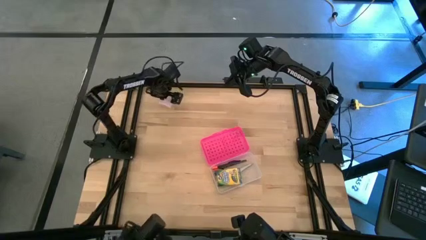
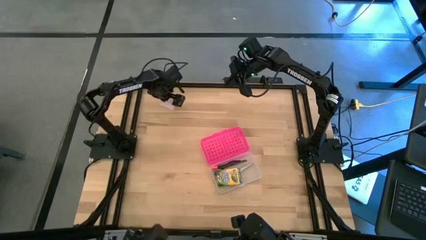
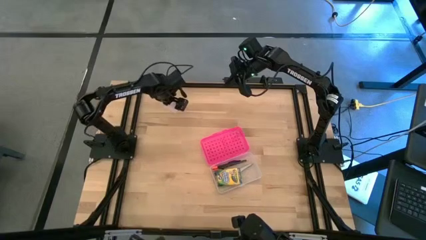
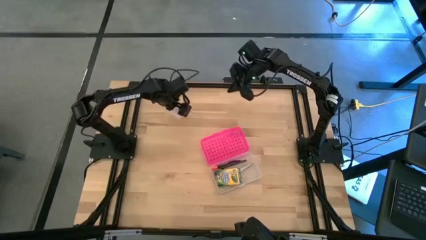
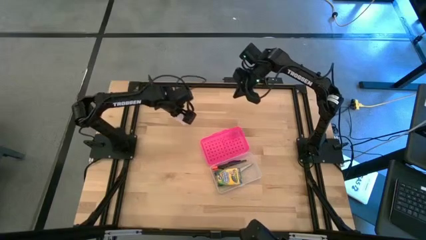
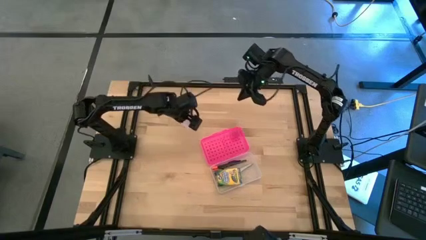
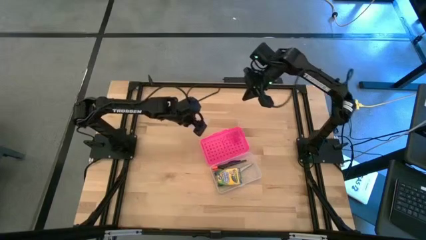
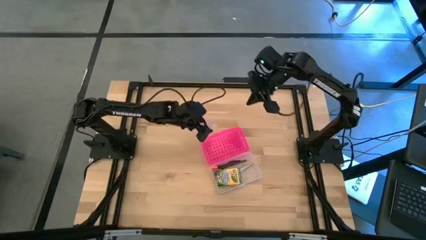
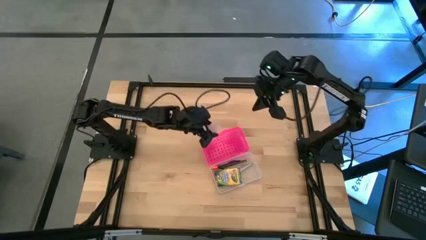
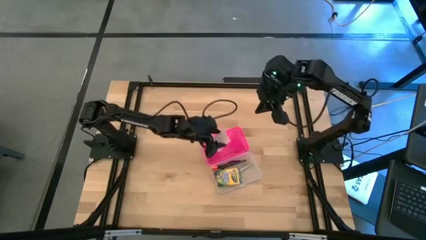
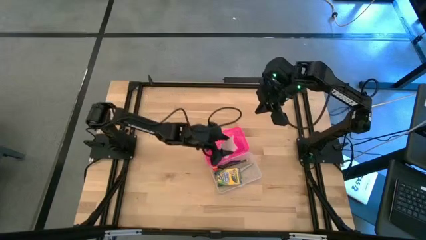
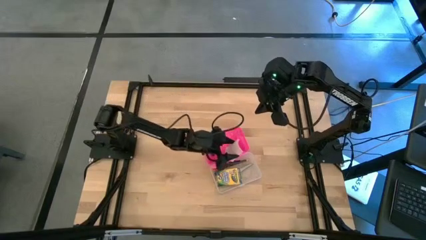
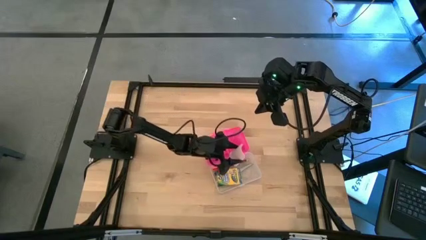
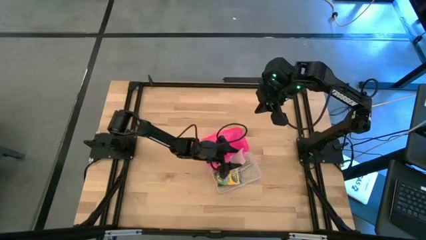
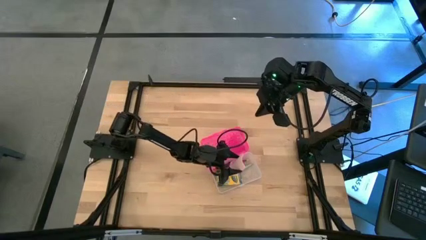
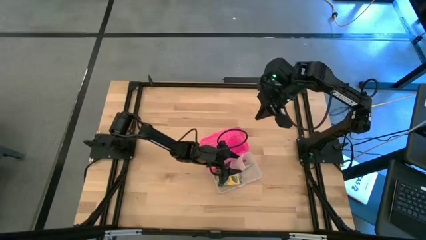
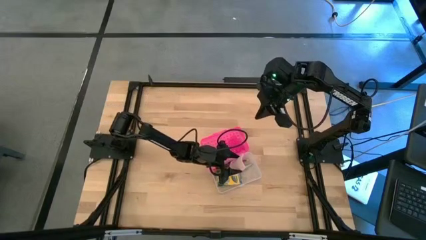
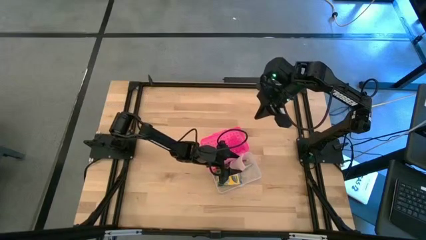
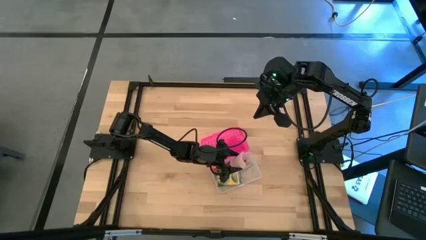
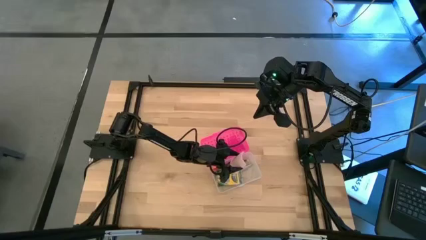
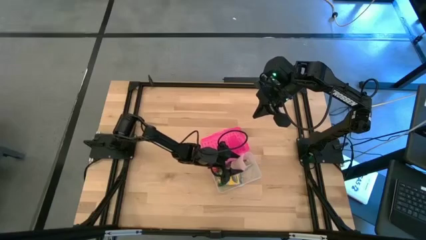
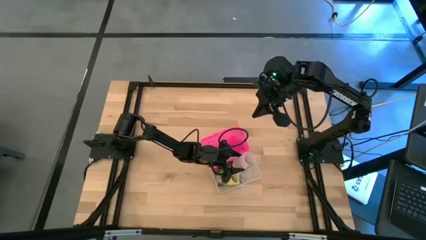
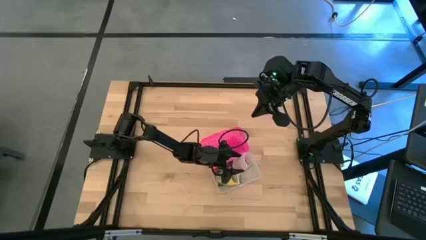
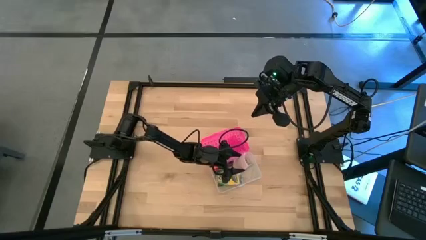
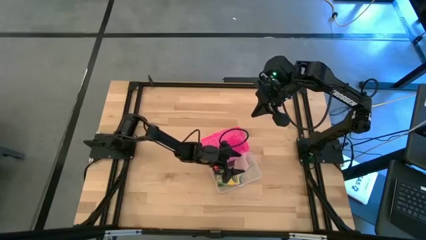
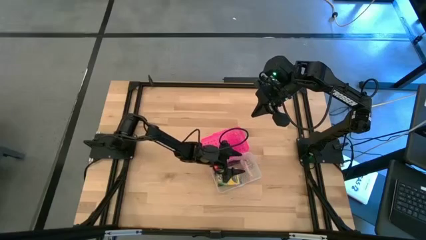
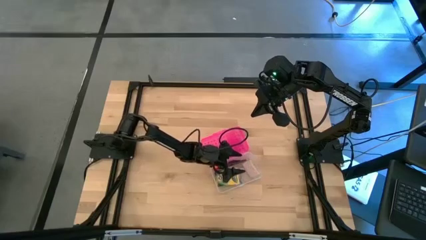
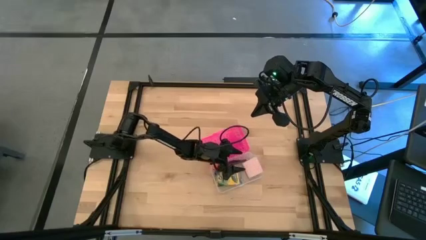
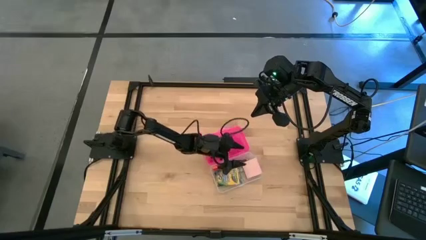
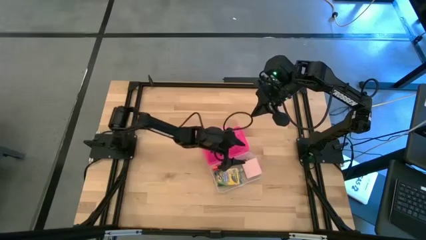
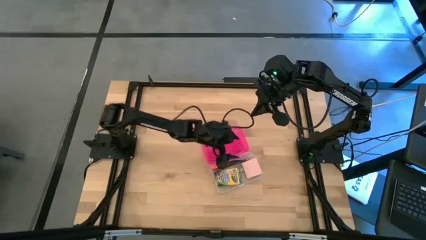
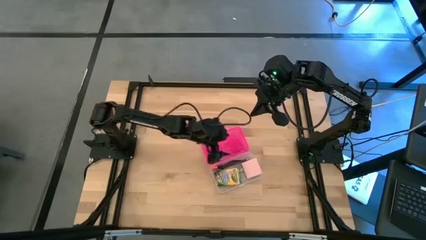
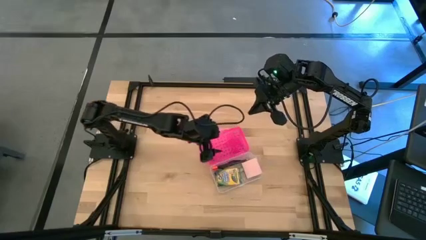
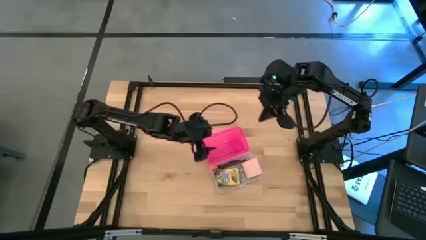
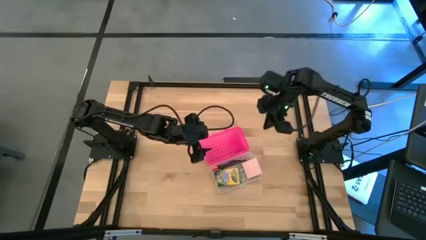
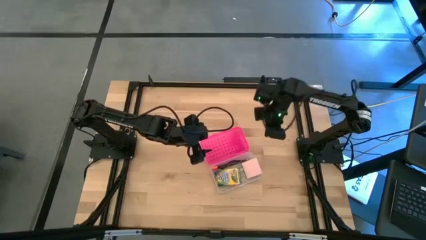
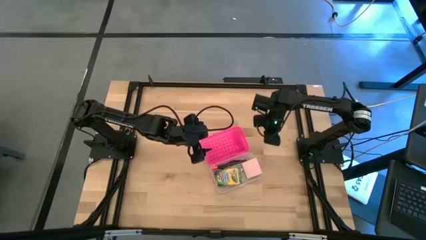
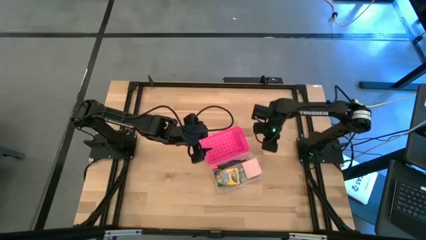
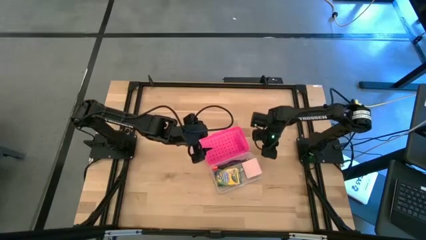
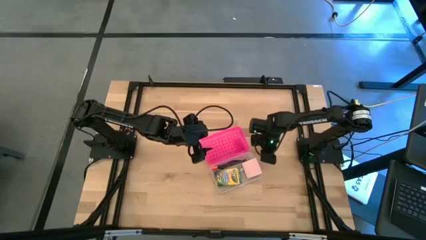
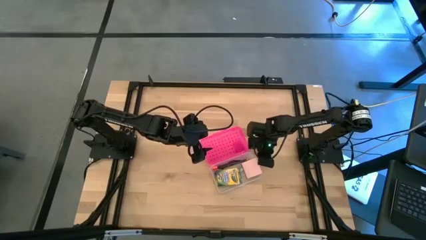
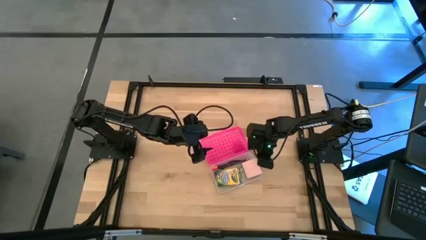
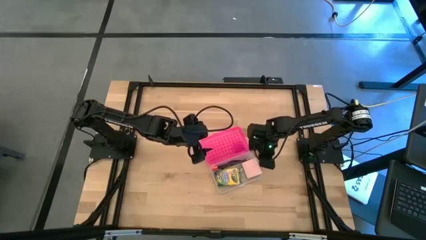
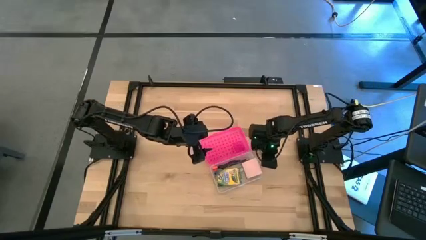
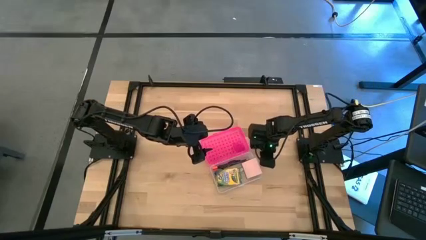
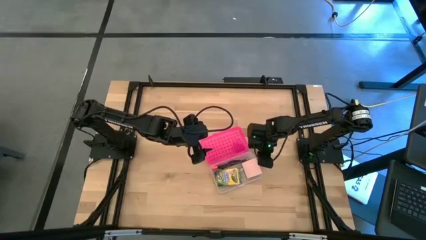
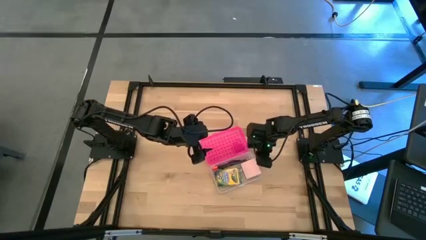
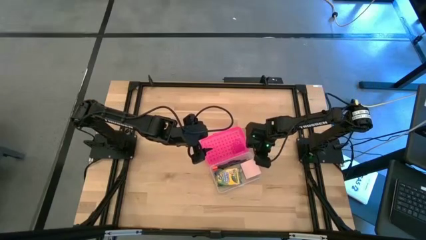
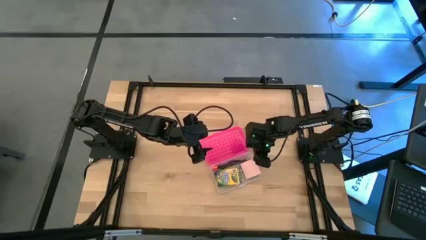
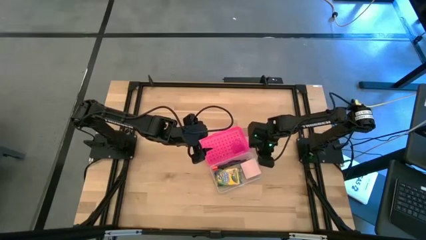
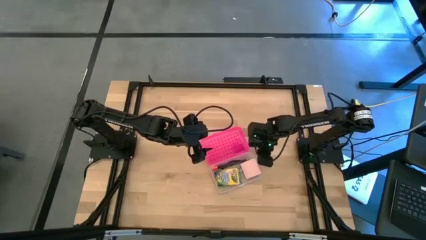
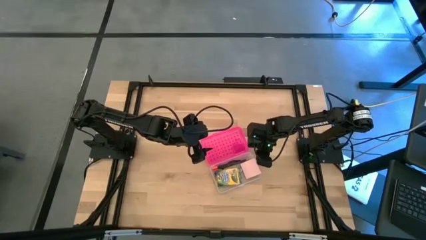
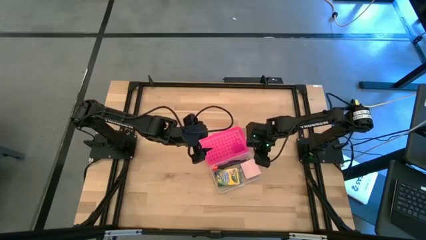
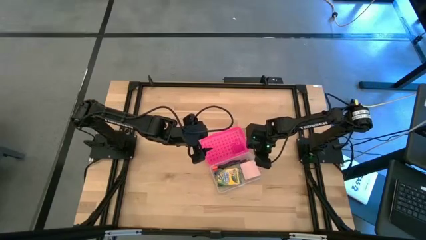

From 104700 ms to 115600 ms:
Task: Pack school essentials
Put the sticky note into the pink box

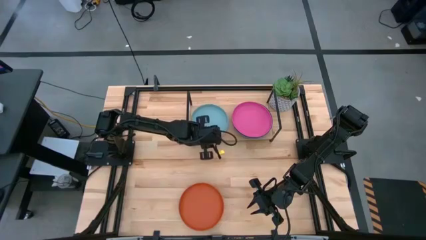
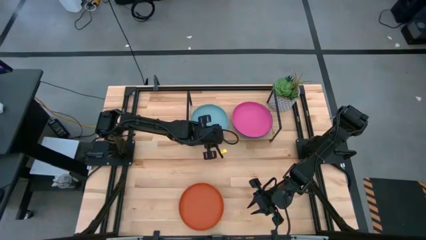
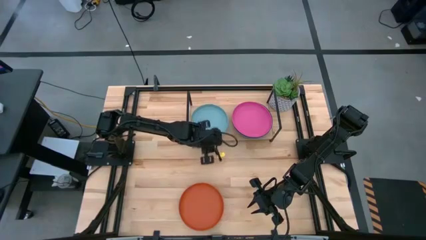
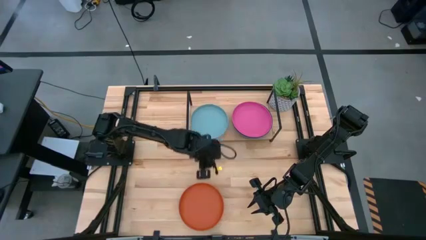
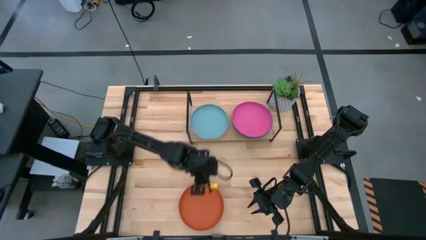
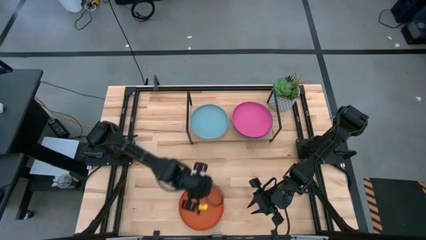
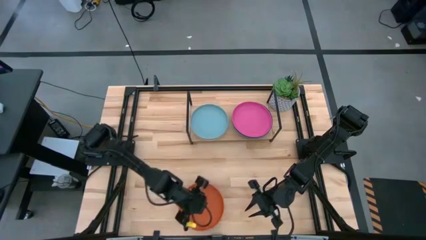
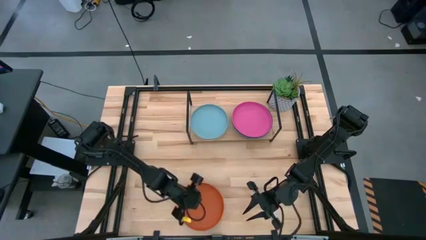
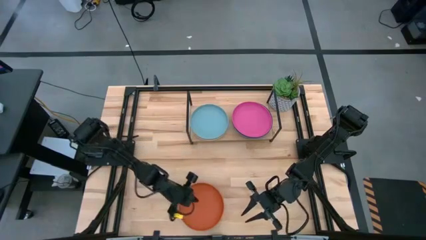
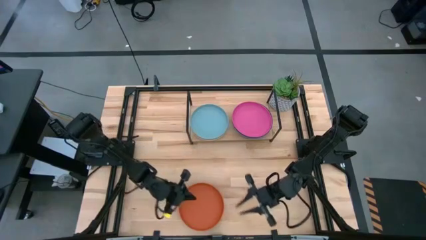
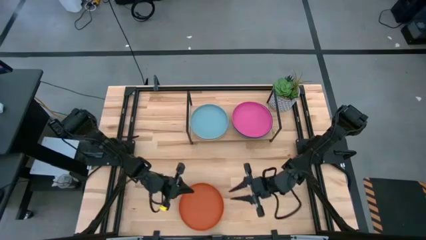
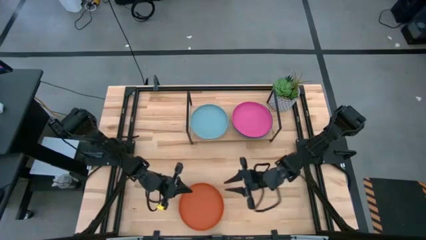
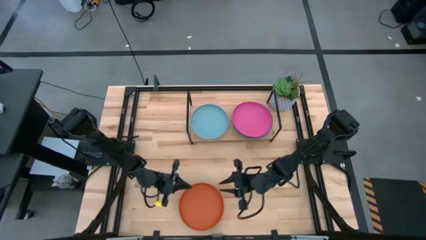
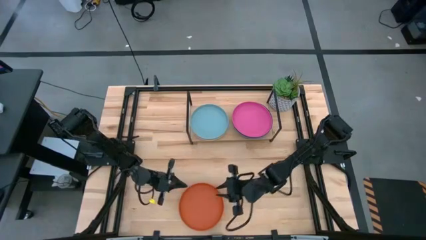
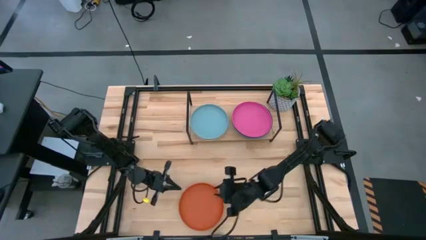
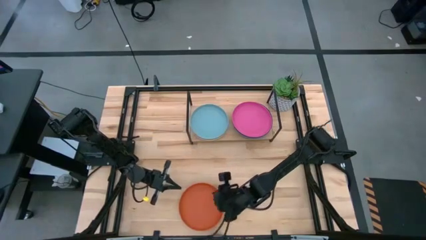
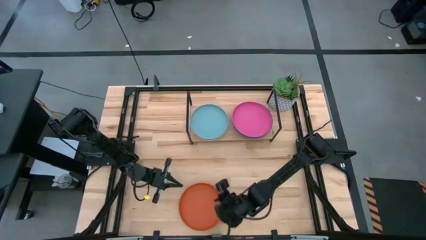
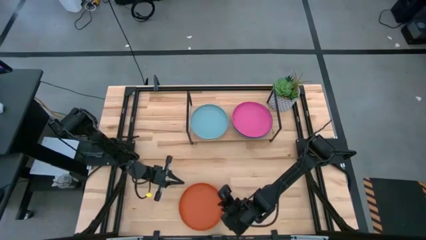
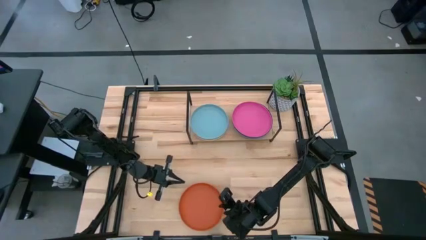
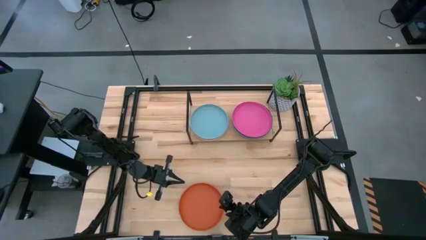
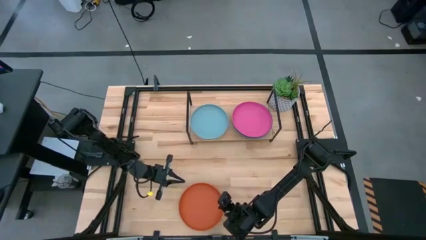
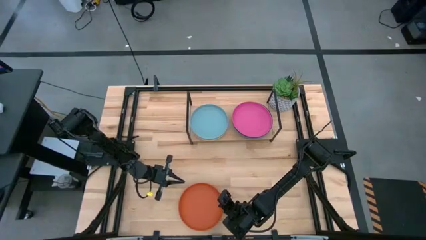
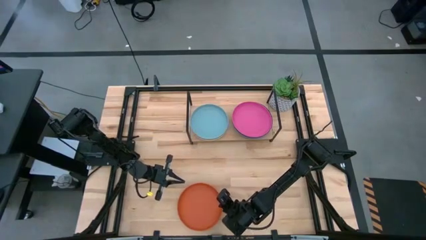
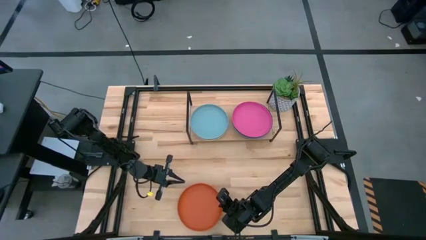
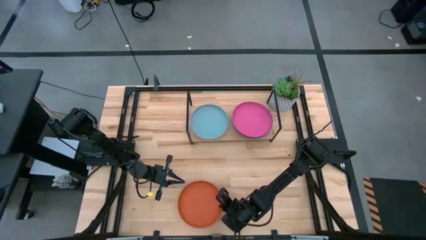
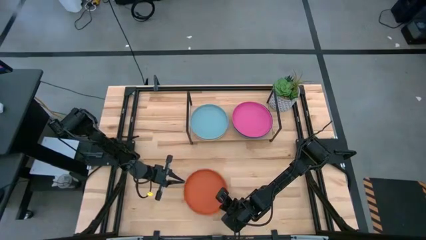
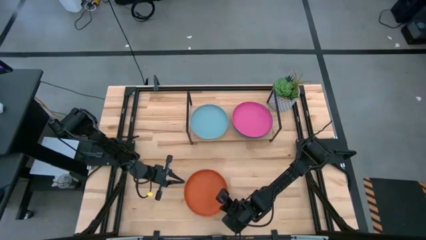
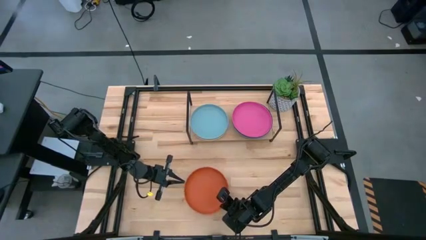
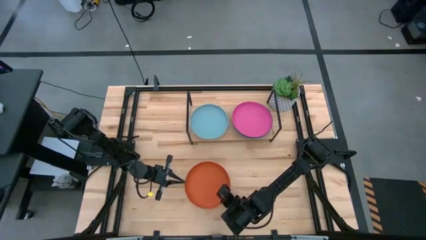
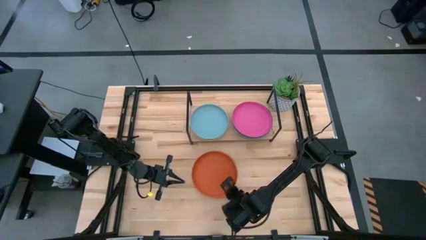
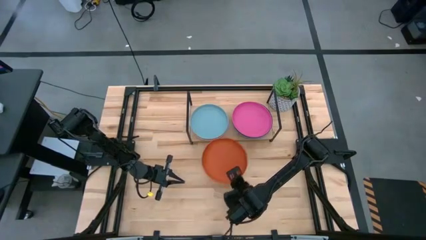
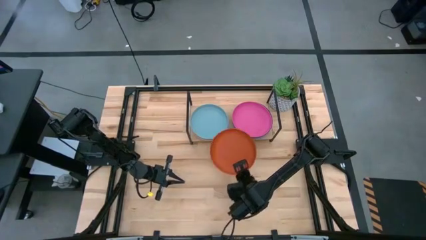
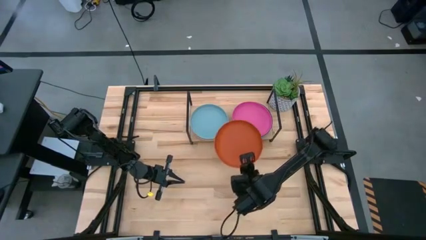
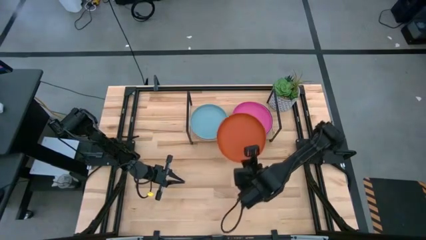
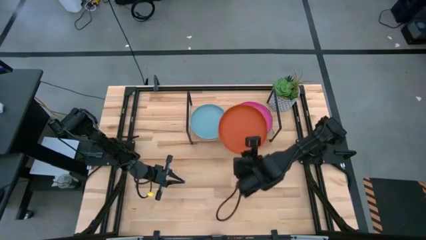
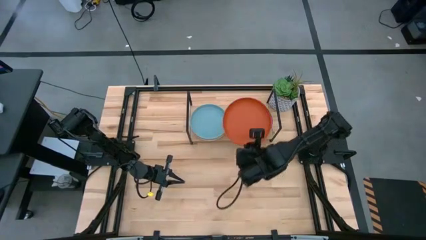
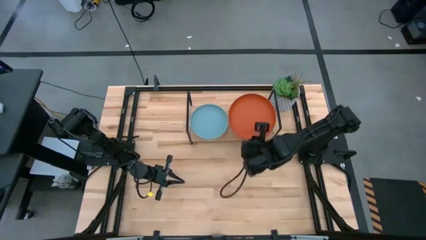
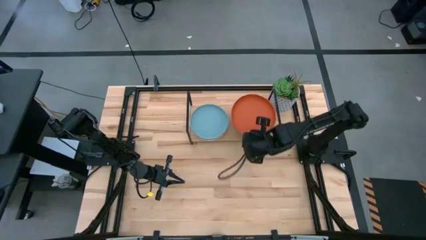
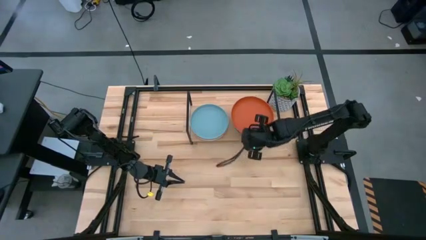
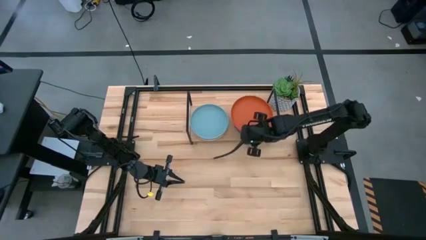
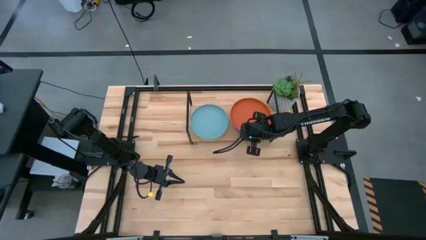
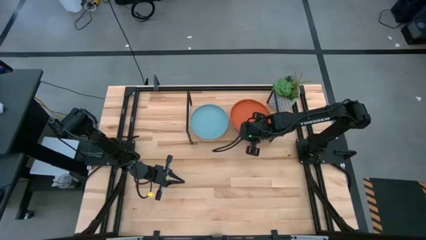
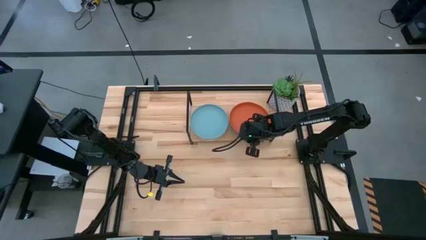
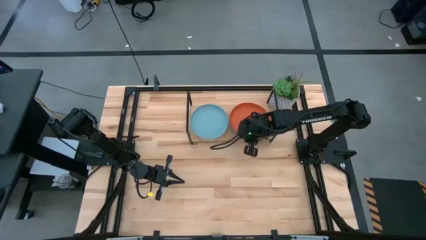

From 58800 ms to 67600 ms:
Task: Place and stack plates onto a shelf
Stack the orange plate on top of the dark pink plate on the shelf
